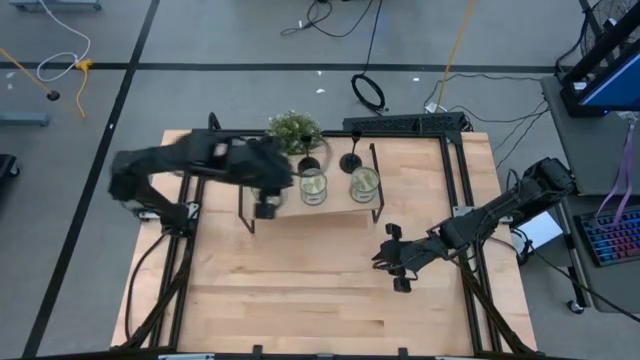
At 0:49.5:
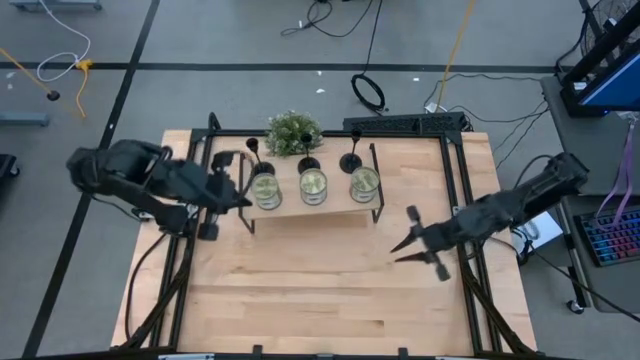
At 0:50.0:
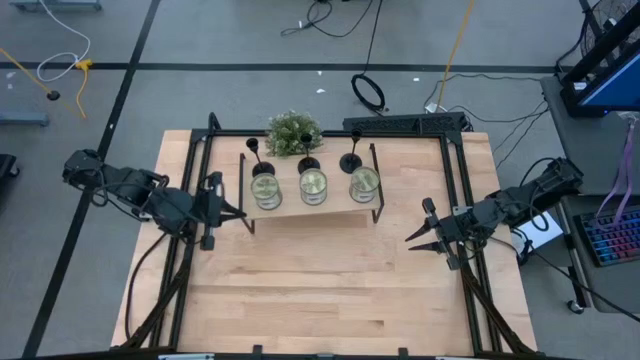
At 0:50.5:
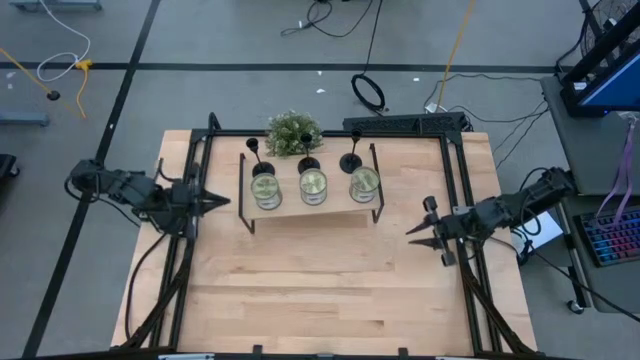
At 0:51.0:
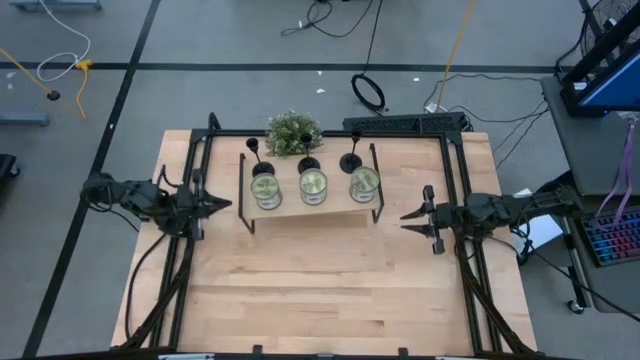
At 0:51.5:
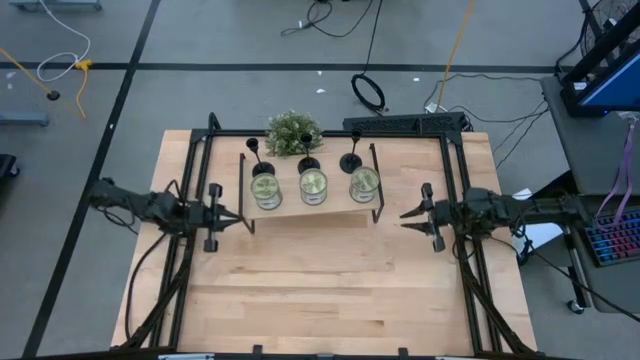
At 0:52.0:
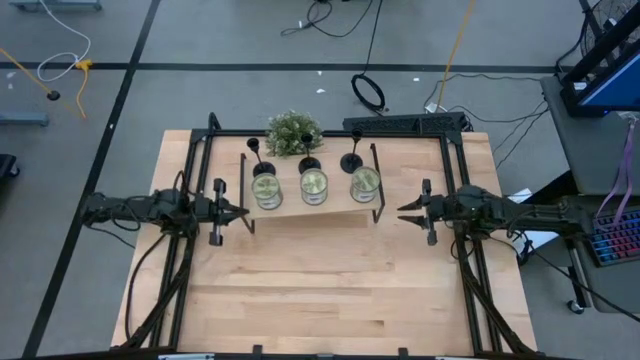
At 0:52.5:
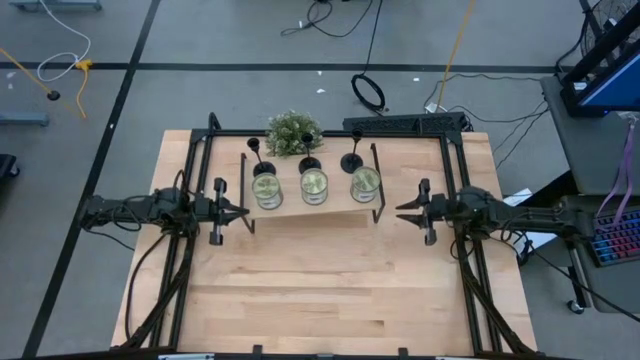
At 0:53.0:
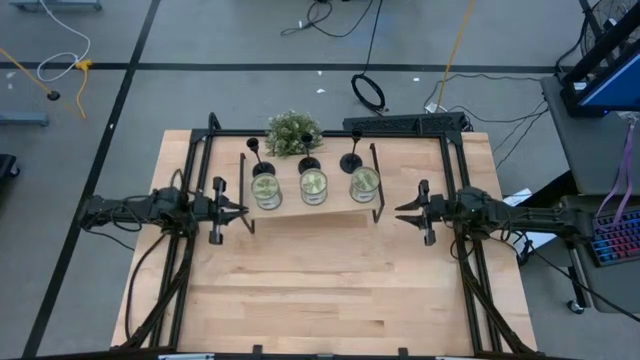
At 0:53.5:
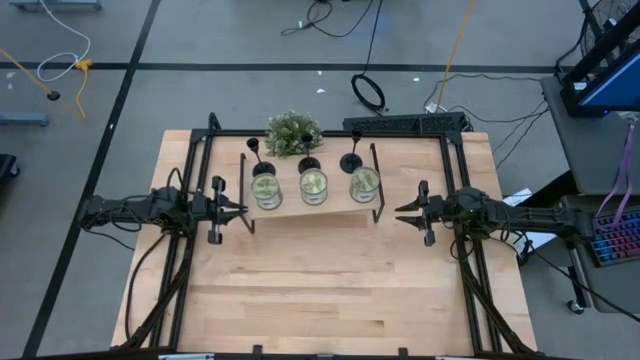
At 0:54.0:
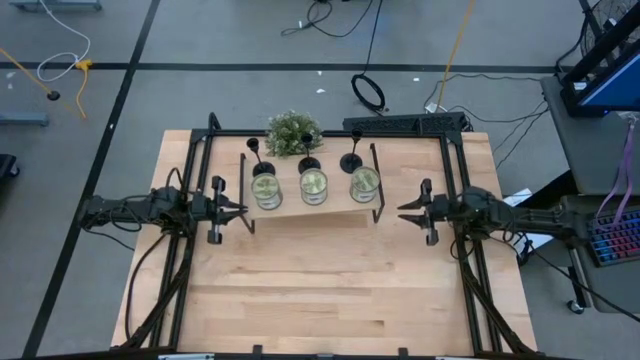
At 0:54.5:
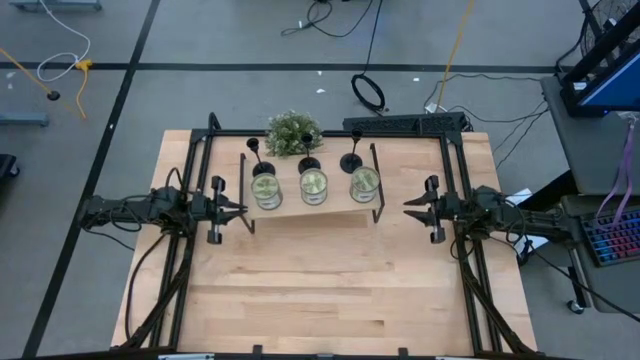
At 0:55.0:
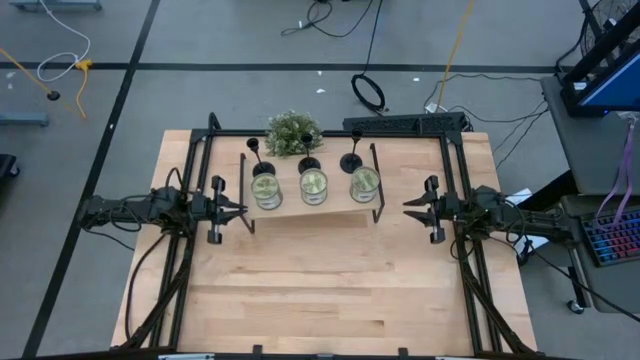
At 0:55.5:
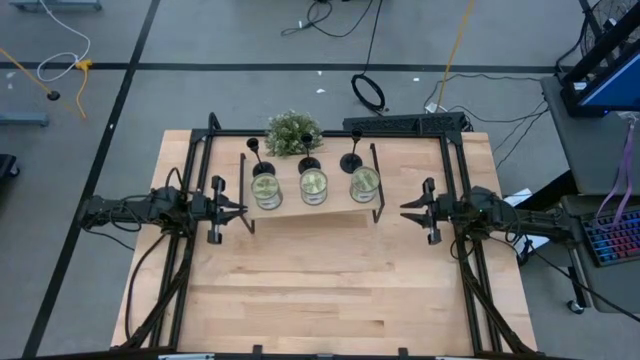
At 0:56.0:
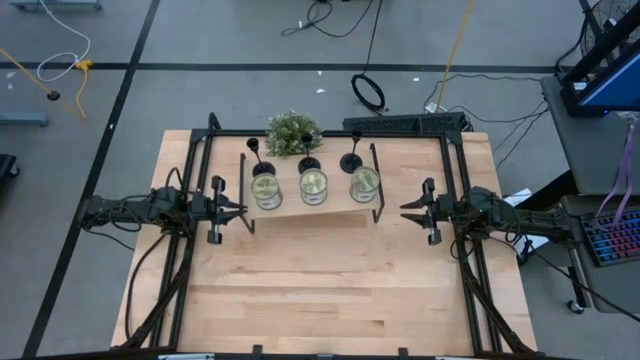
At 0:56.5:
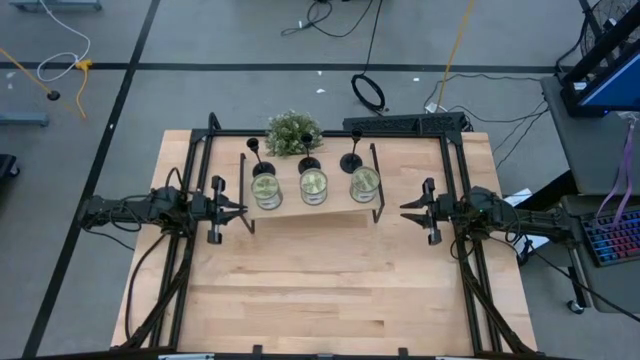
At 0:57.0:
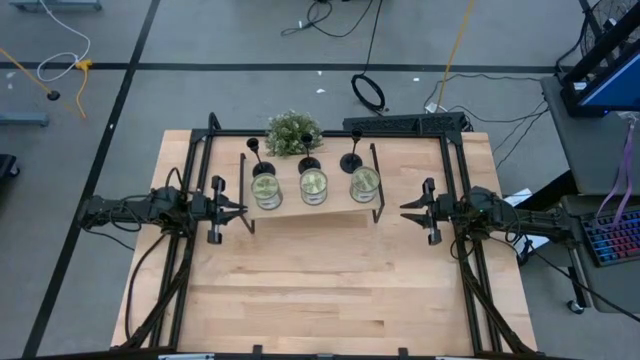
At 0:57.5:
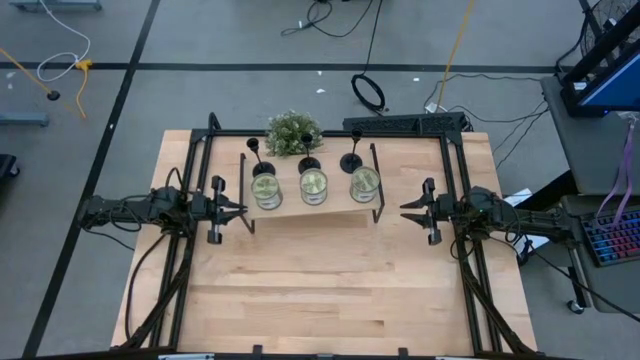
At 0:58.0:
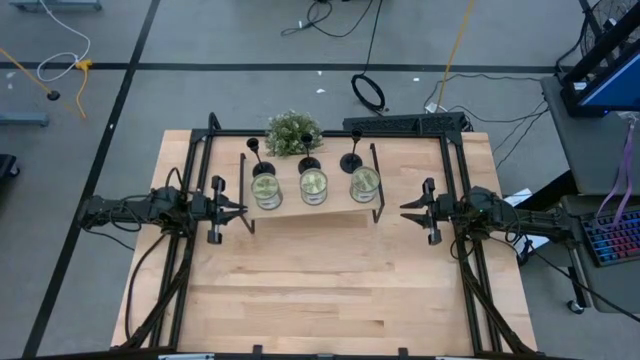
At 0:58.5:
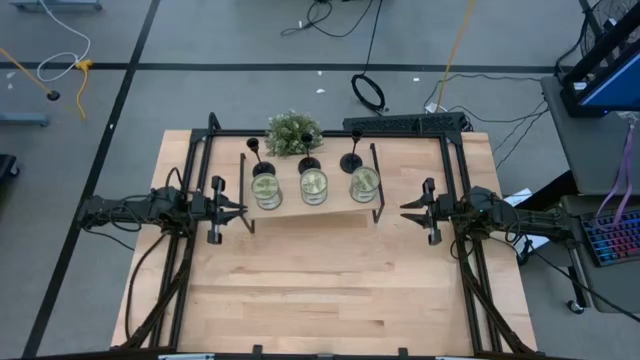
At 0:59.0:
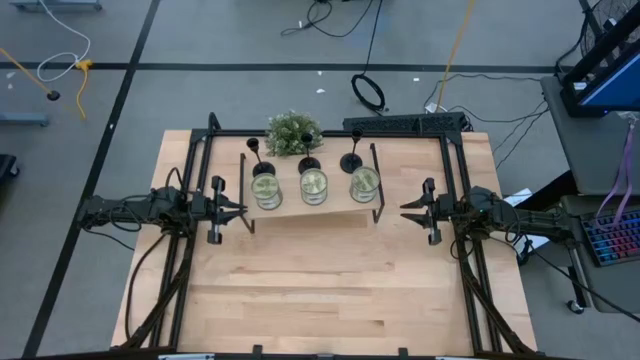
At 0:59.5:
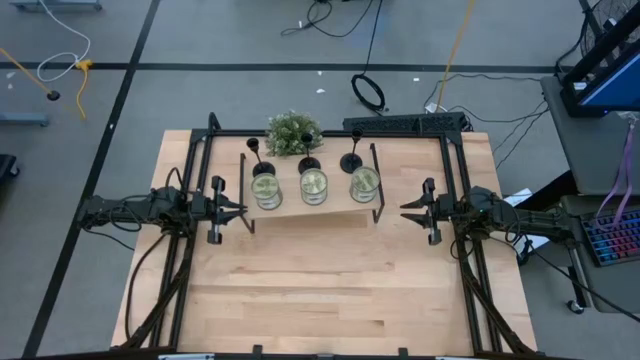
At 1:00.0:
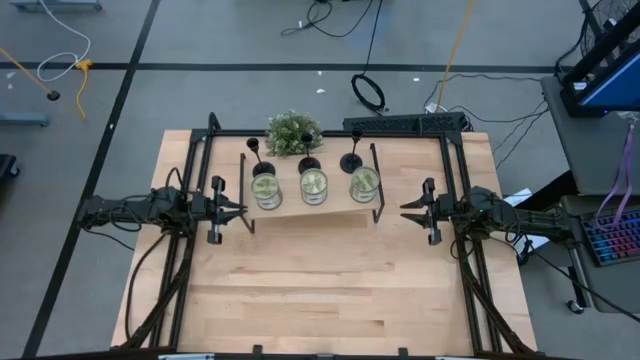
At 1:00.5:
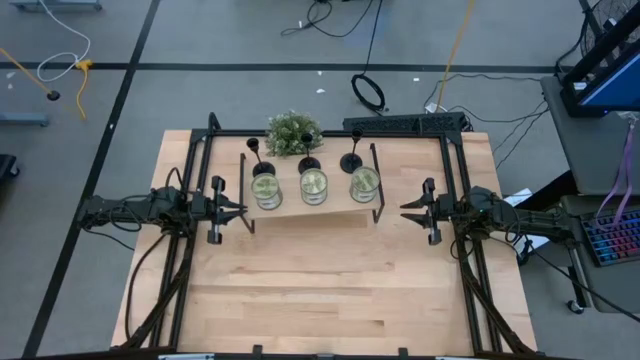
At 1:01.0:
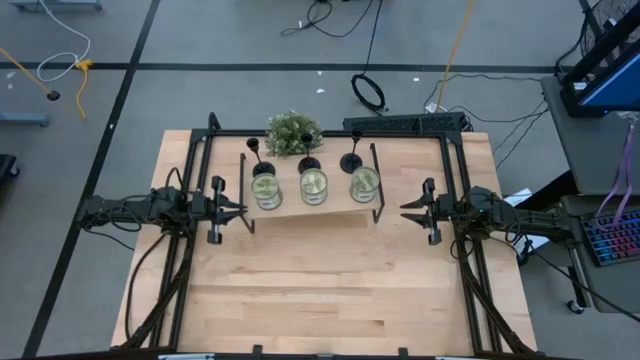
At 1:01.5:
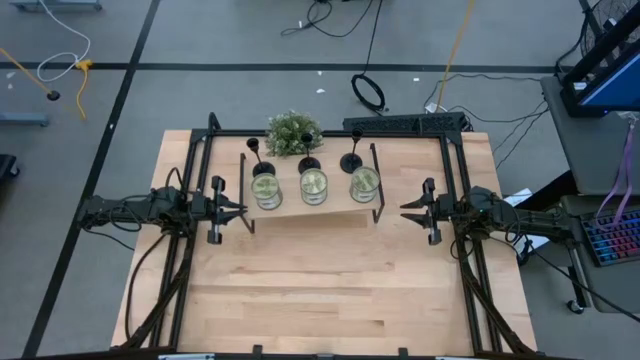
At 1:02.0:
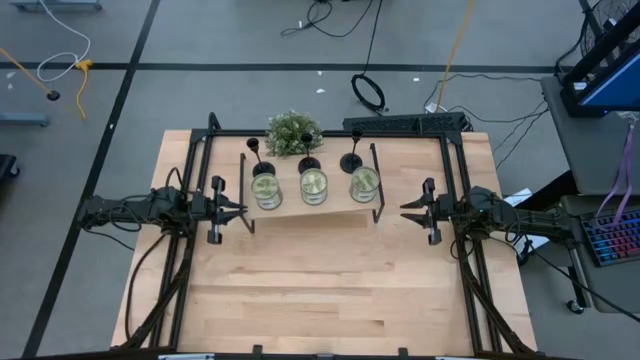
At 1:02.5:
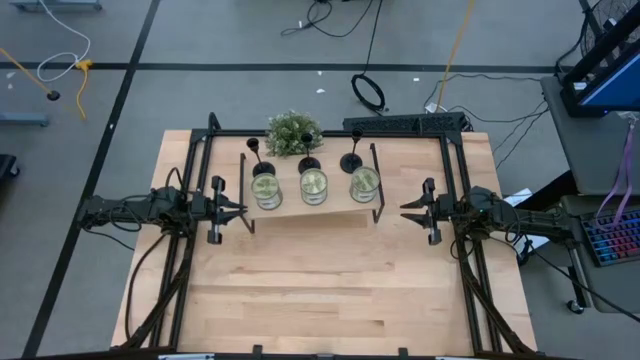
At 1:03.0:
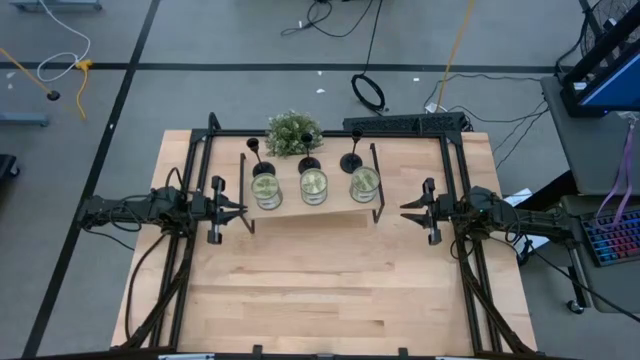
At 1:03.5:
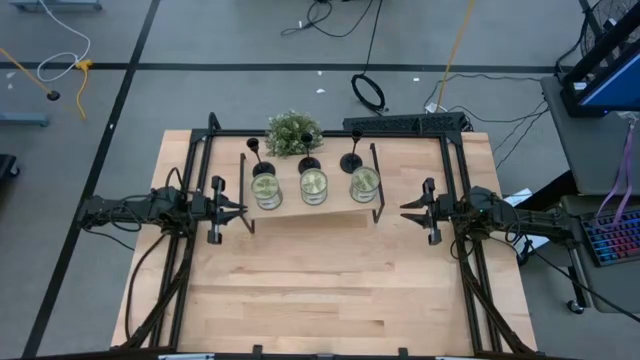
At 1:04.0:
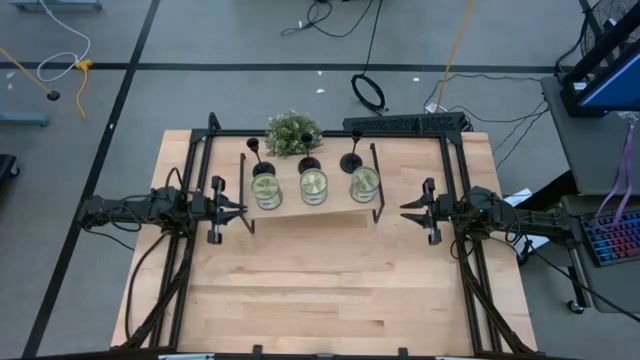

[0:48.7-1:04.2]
Task: Pick & Place candle stick holders
Return to Home Position

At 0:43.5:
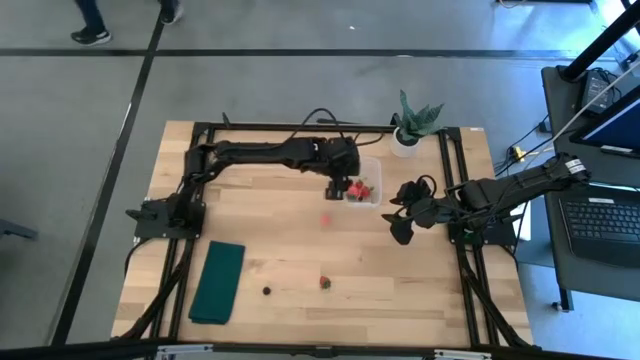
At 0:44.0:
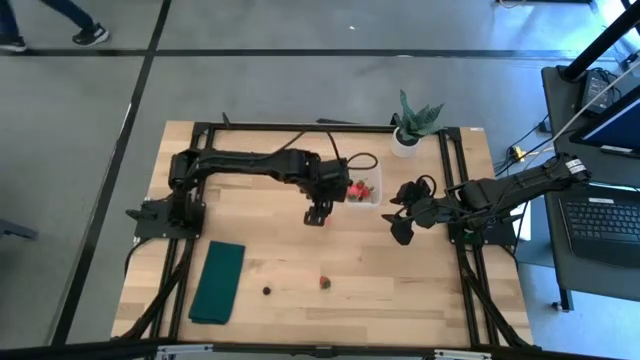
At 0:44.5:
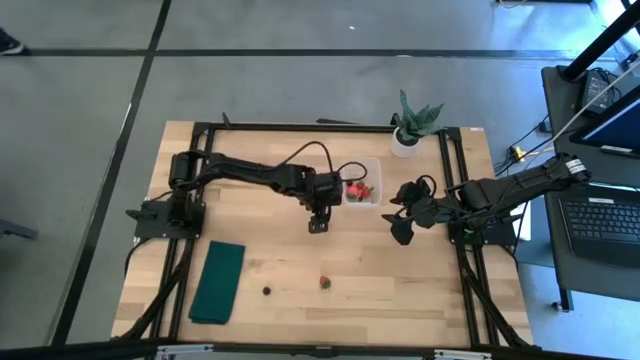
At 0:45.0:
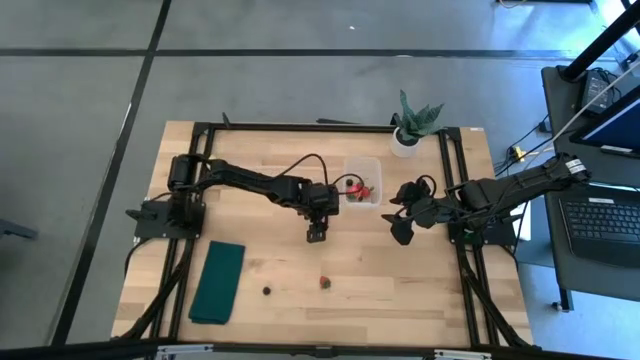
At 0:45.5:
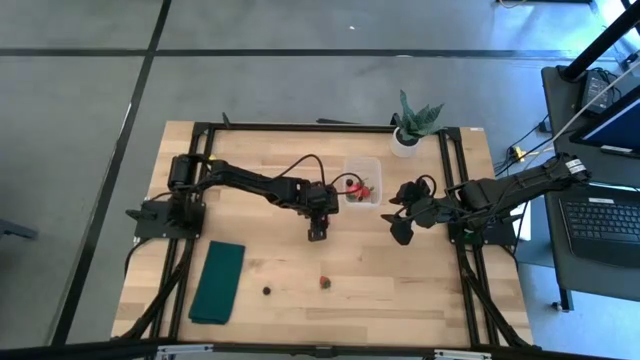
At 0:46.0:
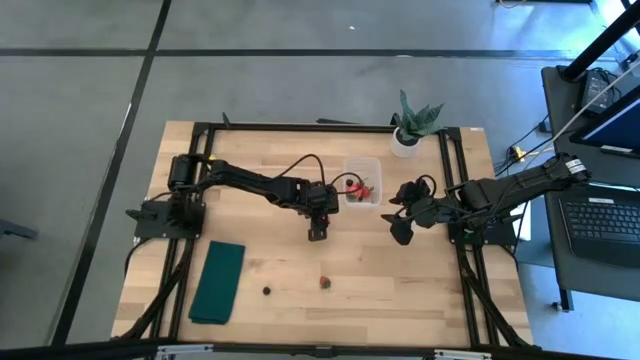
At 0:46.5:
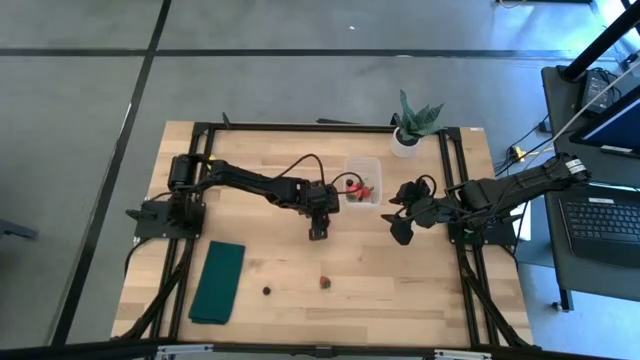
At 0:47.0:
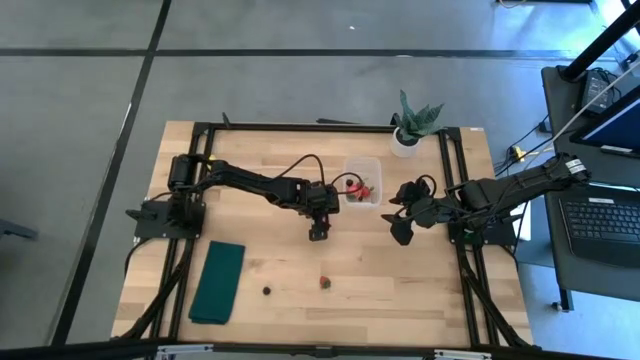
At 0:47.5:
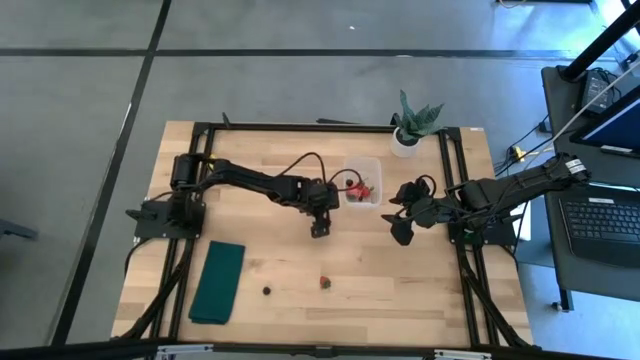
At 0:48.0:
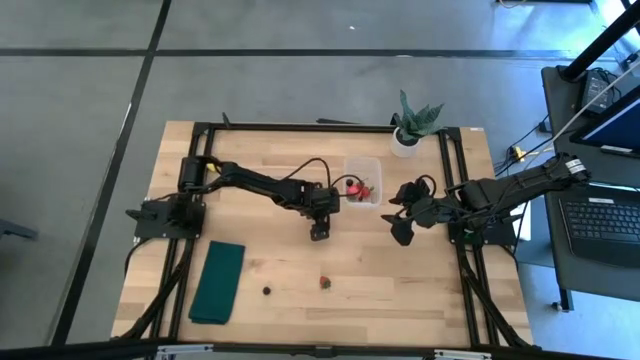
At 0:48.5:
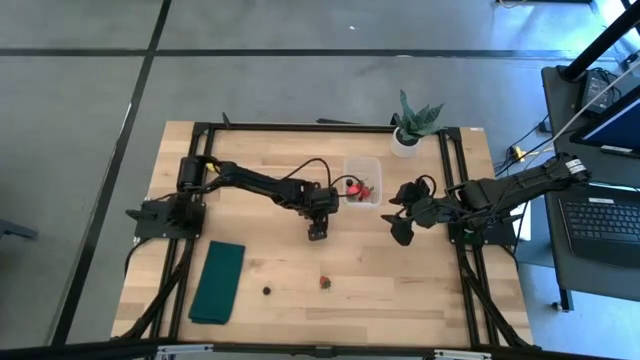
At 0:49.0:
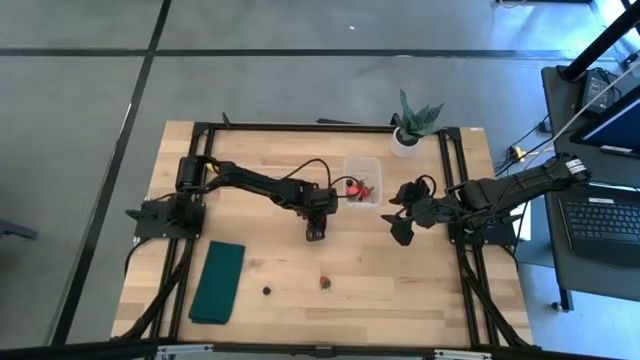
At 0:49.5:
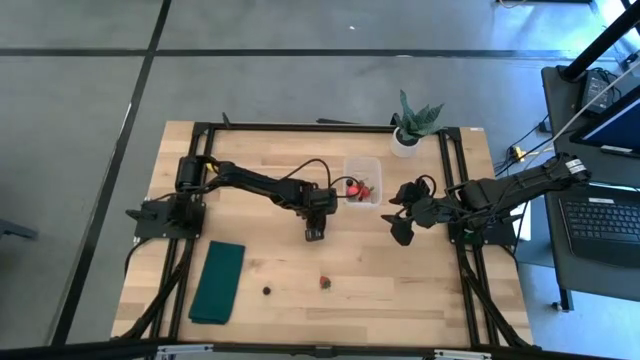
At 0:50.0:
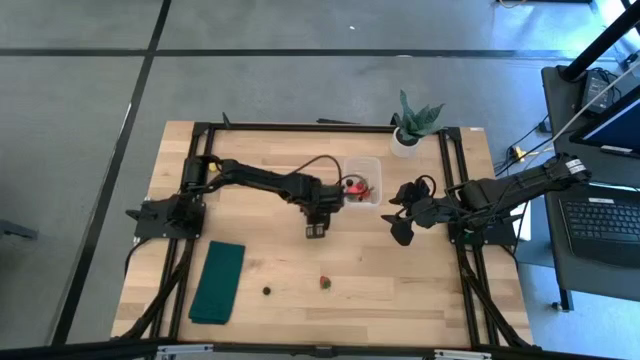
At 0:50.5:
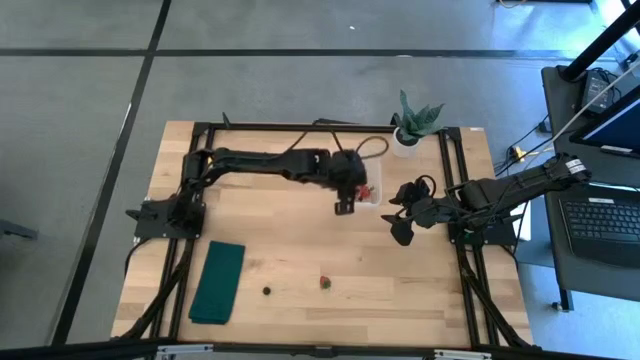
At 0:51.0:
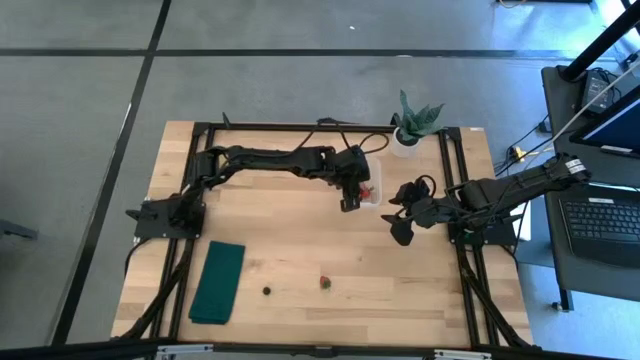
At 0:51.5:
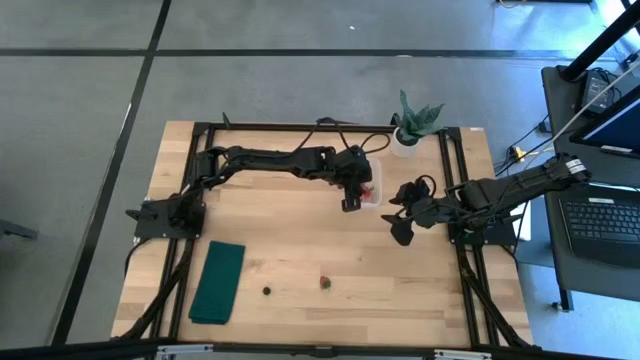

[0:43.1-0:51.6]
Task: Pick and placing Produce into tupperware
Put the pink peach into the transparent container
